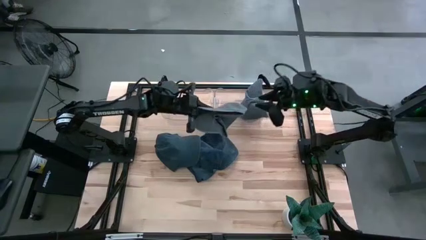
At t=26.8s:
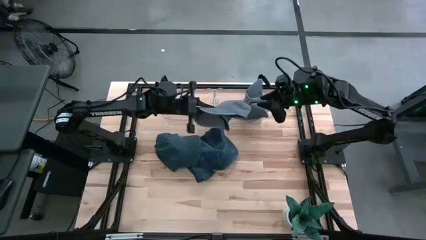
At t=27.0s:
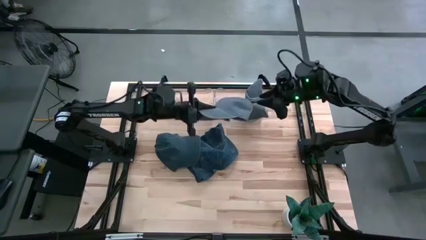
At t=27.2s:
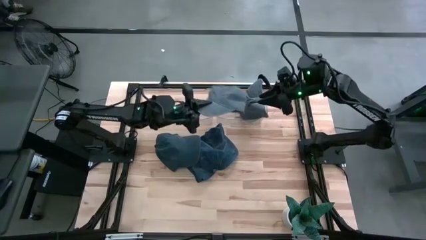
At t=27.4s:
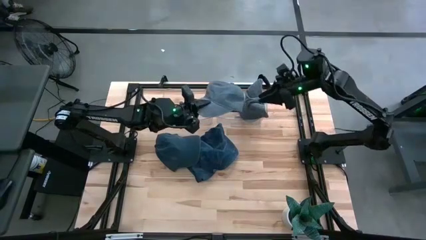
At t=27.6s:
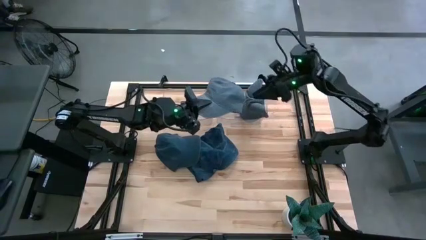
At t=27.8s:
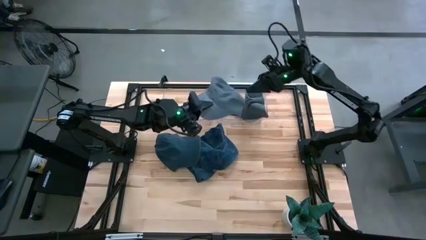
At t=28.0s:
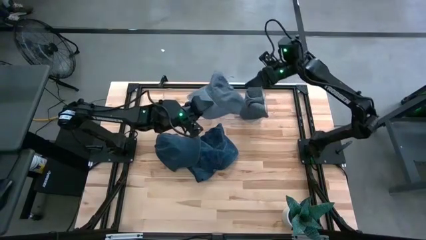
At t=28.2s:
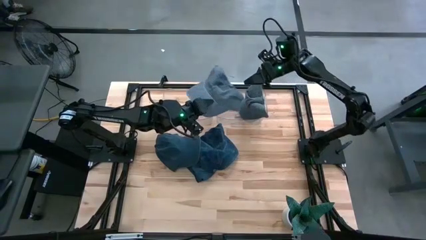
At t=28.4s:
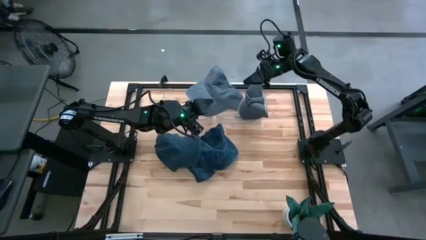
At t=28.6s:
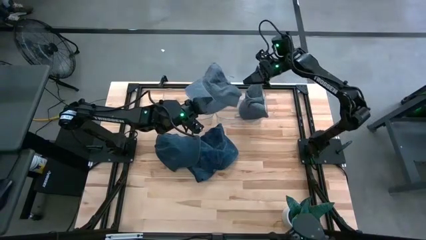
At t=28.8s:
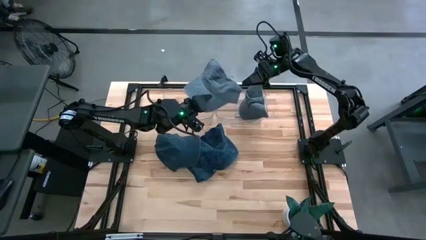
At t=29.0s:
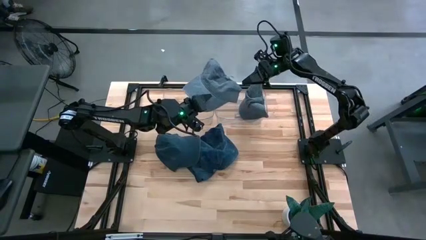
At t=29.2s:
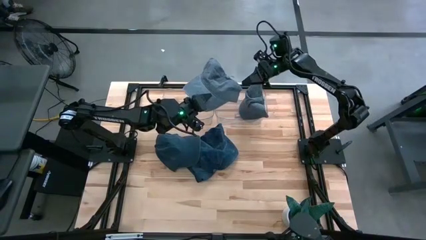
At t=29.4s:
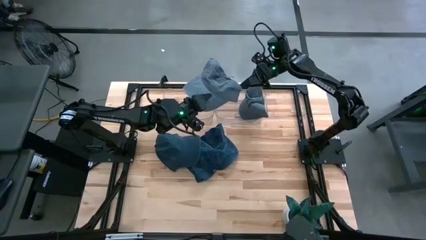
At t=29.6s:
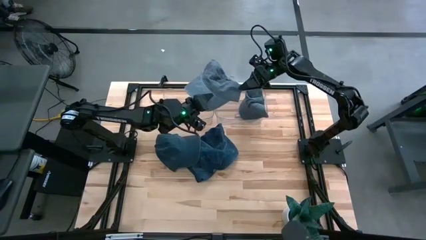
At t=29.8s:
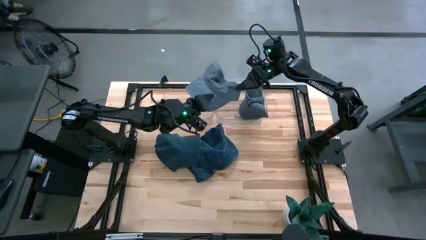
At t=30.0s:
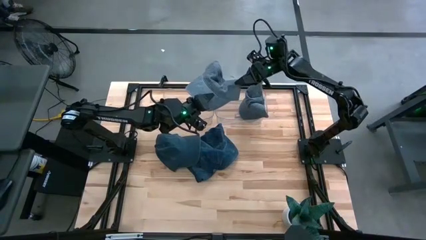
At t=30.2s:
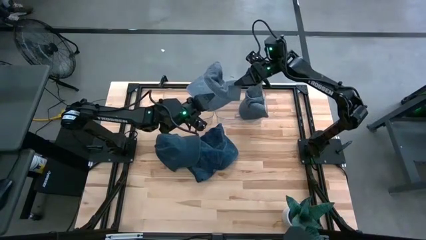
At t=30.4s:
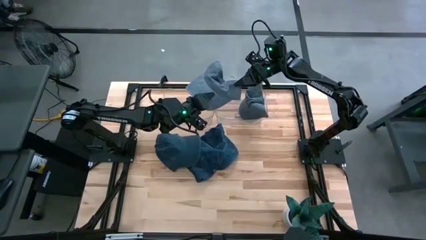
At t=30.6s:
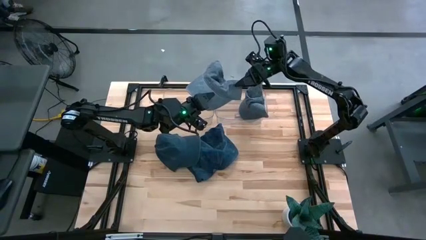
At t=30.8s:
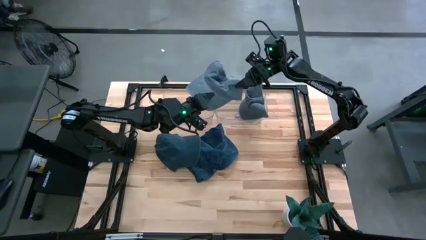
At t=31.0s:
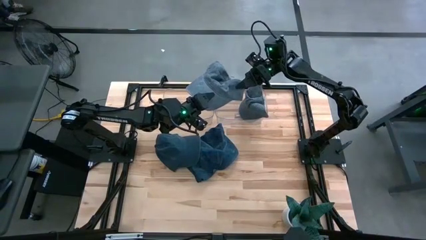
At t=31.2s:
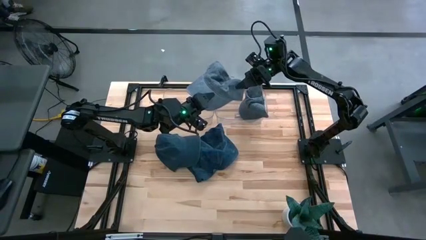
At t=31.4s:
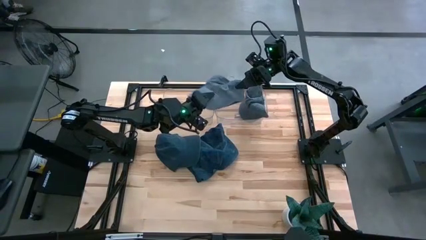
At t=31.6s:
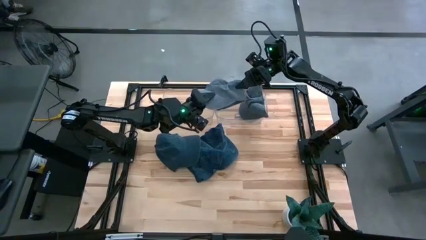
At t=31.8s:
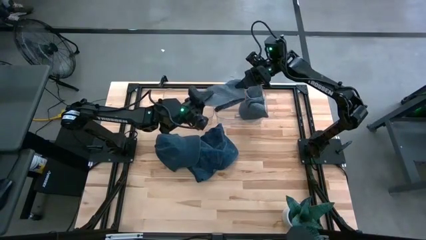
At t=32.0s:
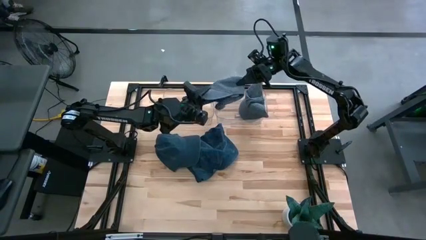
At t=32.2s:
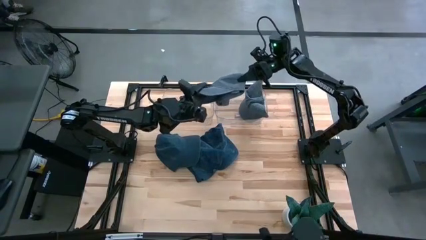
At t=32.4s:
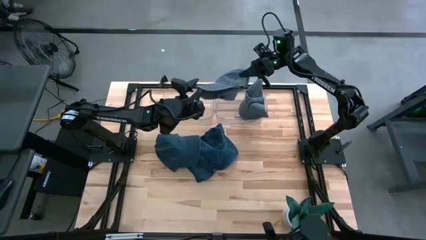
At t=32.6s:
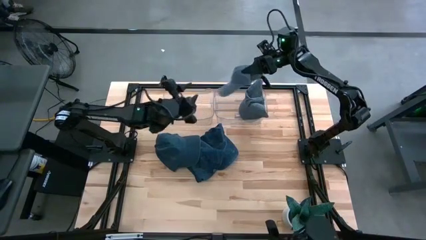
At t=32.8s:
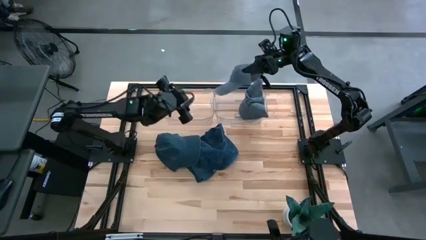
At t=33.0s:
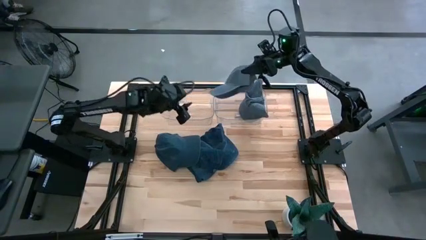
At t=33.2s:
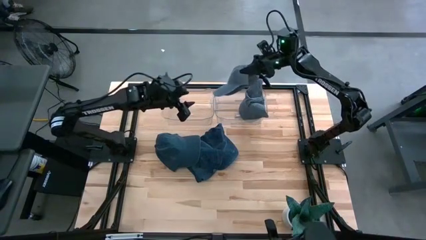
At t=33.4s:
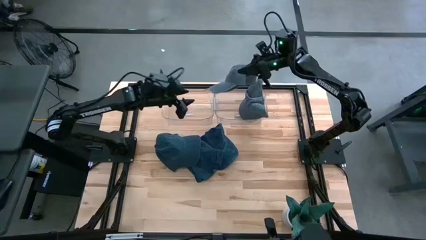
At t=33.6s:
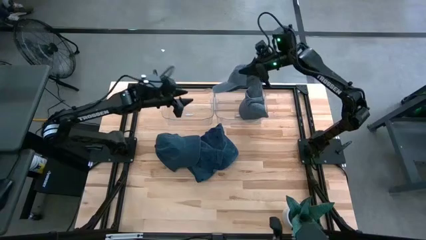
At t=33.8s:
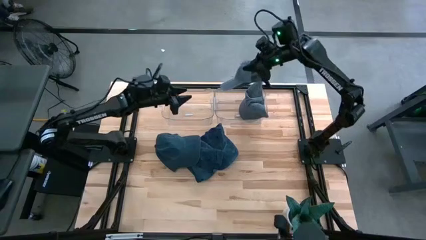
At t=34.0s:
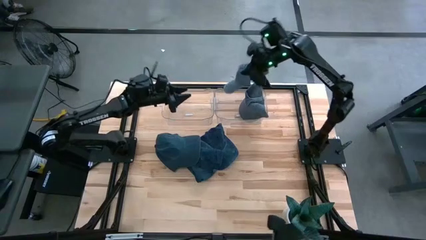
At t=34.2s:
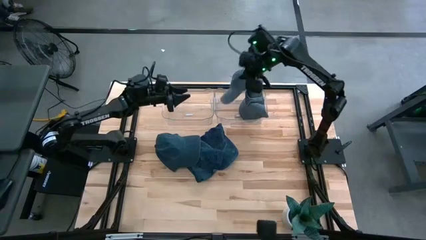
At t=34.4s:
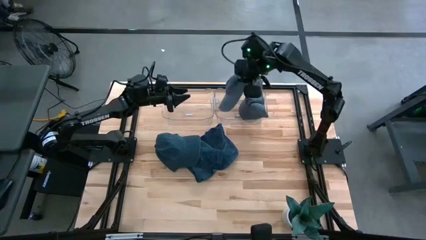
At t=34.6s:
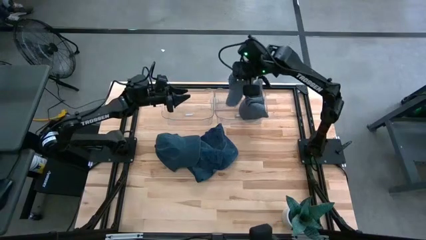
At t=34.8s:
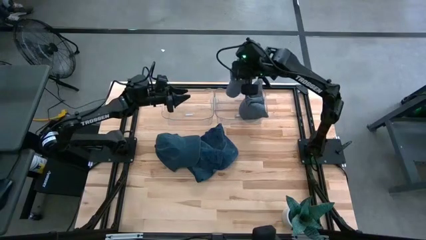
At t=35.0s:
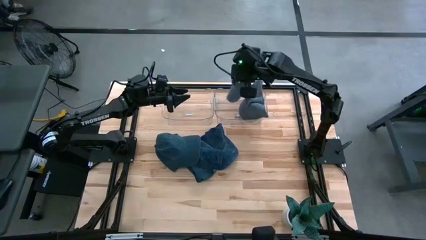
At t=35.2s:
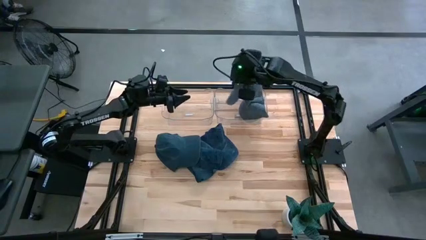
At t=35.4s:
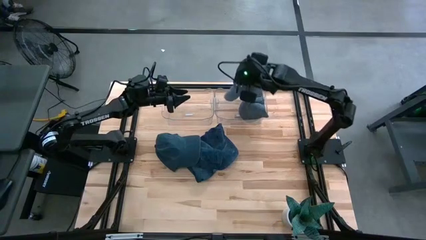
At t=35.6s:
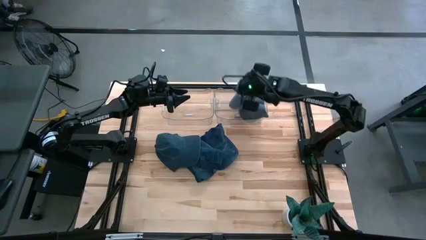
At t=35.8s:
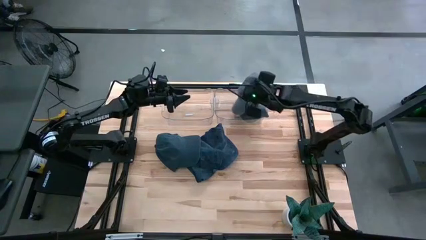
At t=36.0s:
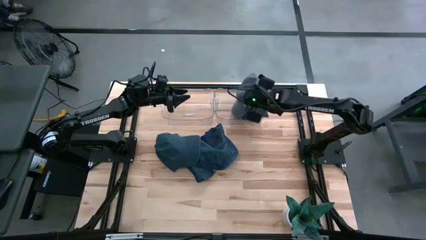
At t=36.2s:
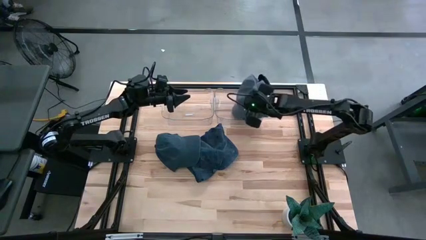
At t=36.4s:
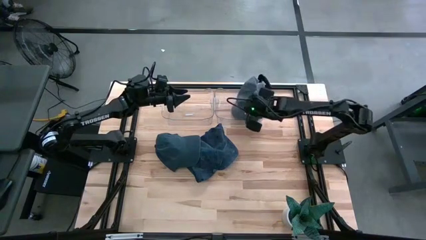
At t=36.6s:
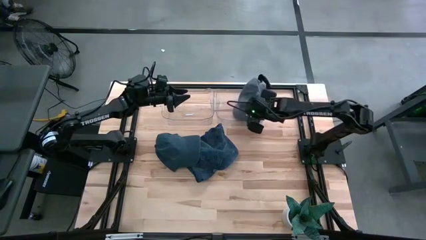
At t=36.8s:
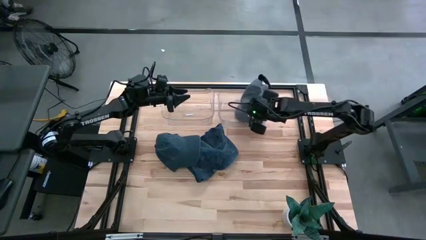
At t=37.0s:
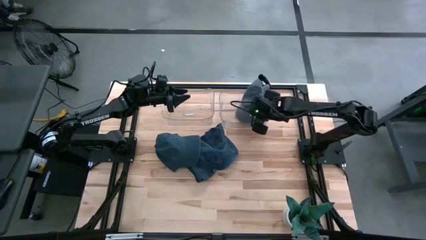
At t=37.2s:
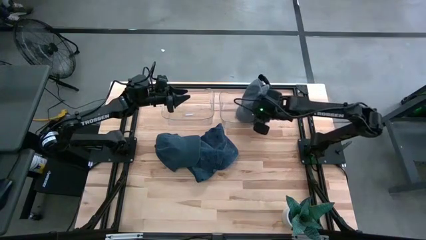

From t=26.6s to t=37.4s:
Task: Pick & Place hat
Put the gray cap into the right transparent bin

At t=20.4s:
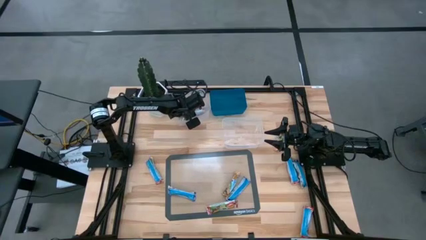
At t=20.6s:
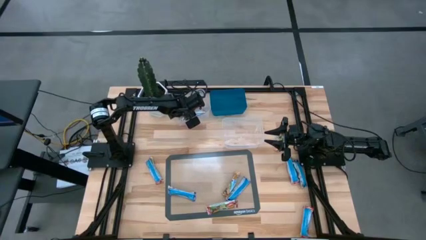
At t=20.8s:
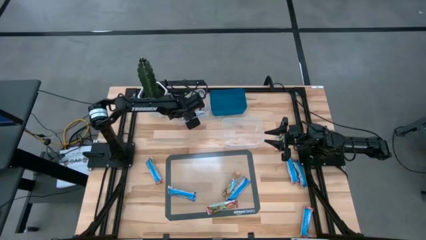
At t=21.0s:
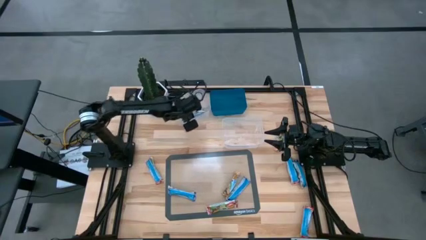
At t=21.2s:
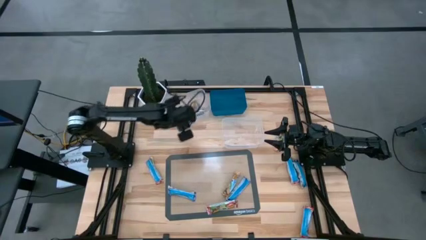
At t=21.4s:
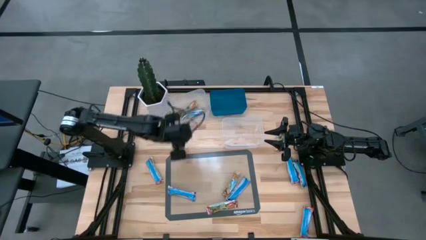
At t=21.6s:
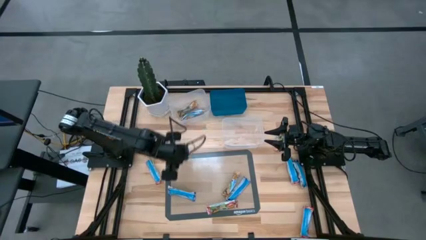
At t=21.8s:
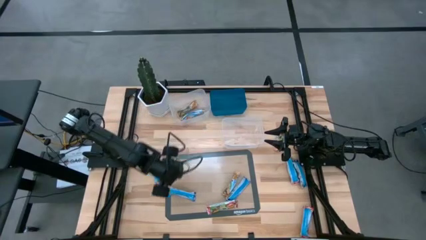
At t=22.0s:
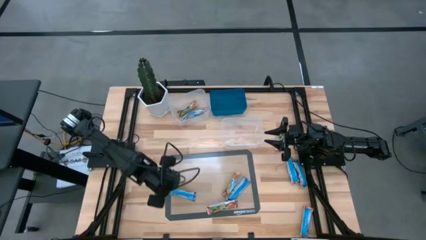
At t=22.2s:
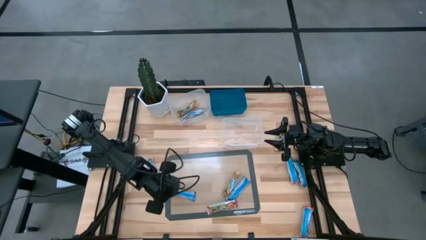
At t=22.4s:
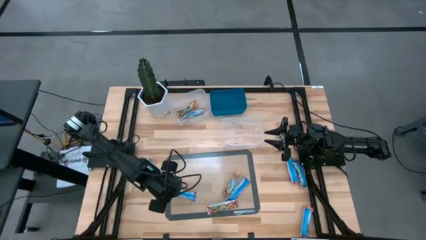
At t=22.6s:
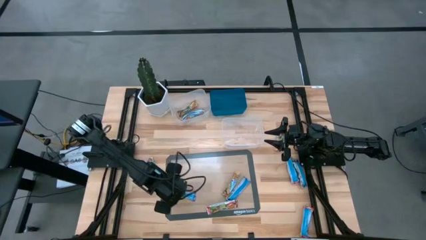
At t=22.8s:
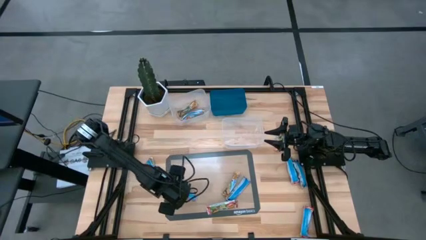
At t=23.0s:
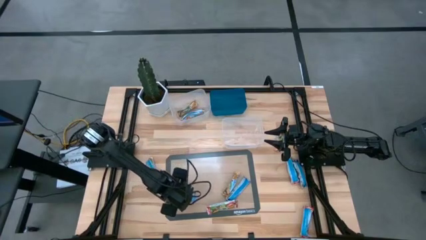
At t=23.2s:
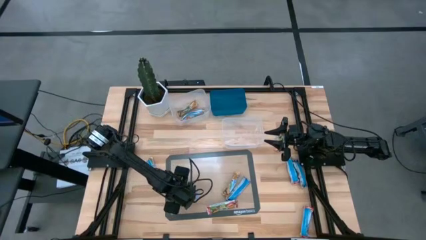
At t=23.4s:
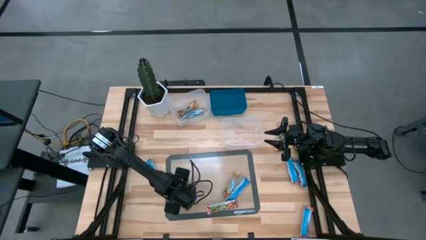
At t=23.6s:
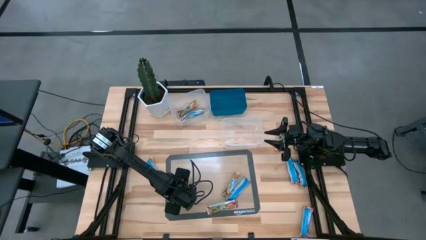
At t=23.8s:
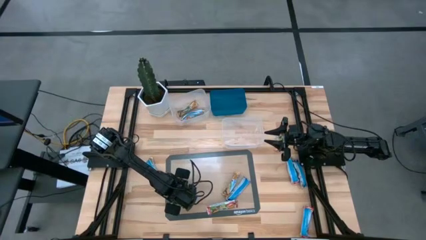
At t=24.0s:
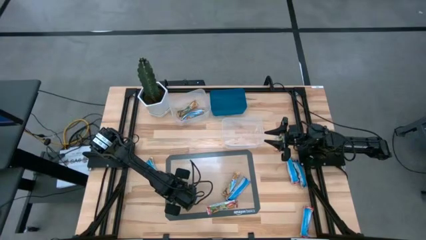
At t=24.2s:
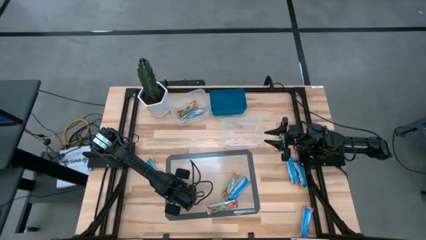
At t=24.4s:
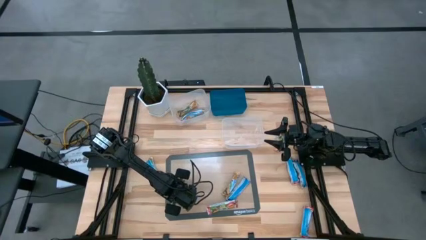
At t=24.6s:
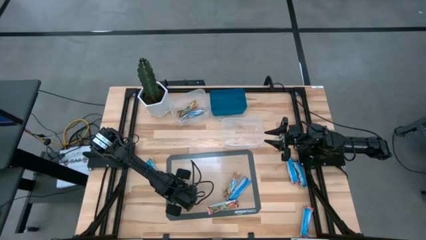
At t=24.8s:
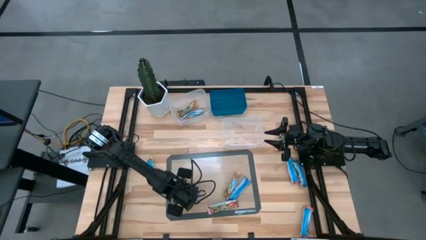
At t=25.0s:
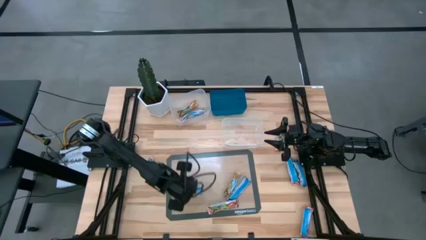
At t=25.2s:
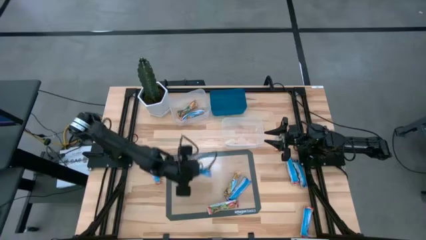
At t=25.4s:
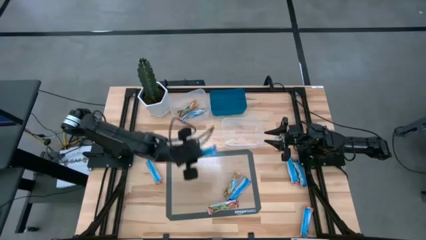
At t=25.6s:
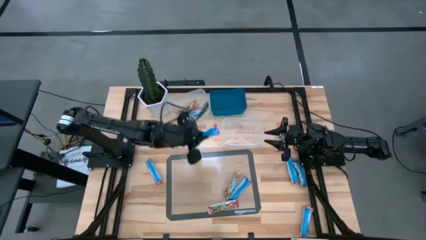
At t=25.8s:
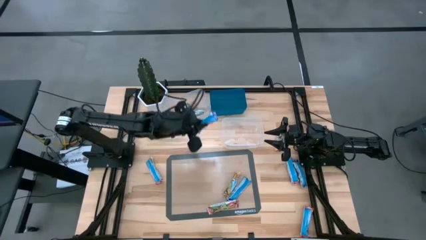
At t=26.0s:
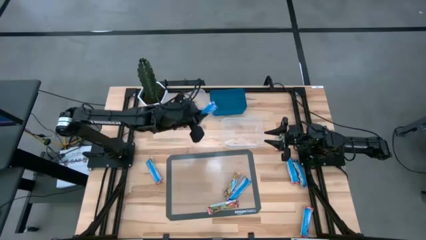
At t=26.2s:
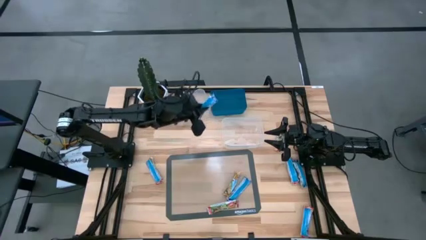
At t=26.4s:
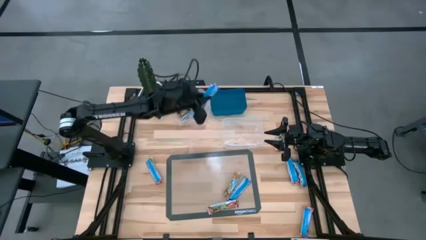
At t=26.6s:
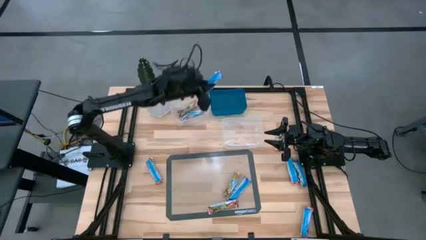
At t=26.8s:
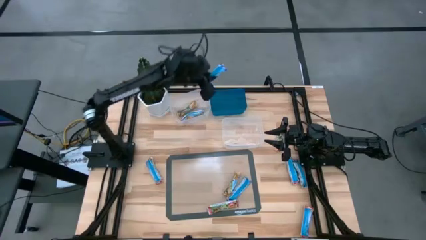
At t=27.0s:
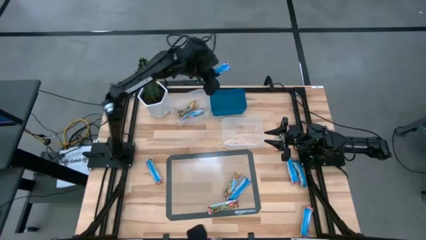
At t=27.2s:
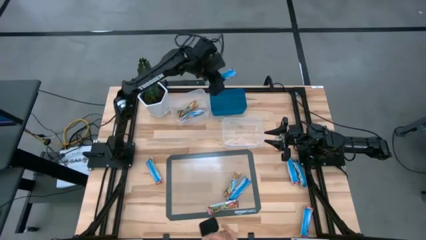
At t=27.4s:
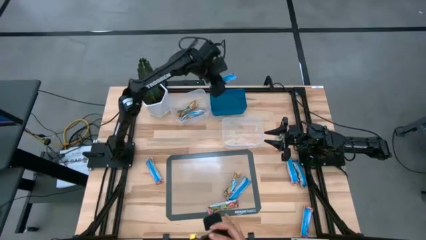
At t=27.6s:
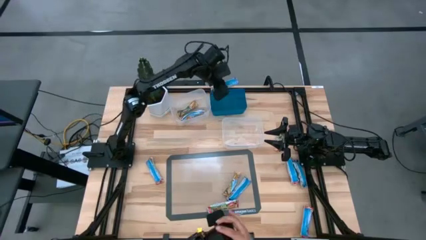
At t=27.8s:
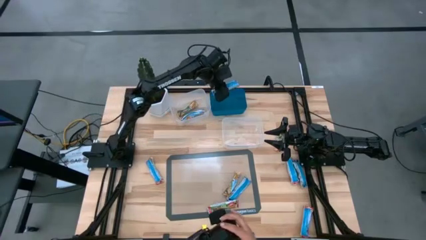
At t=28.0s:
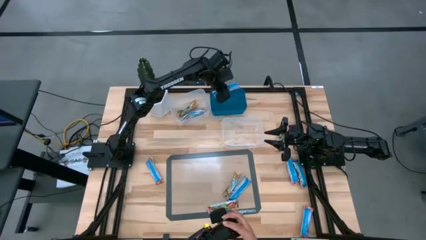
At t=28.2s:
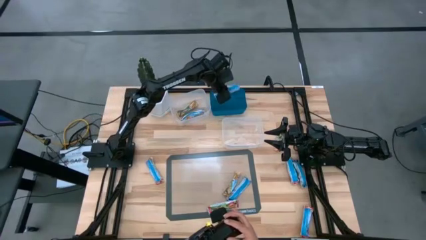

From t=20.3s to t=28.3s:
Task: Pick and place Granola Bars by type
Put the blue granola bar into the blue bin
